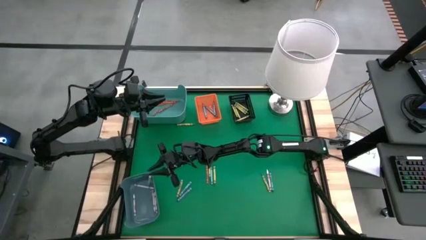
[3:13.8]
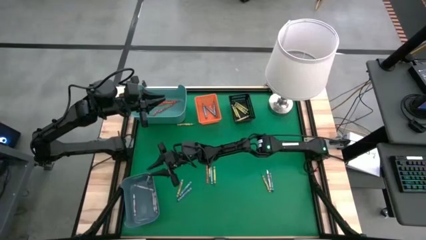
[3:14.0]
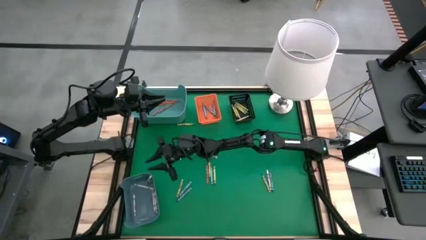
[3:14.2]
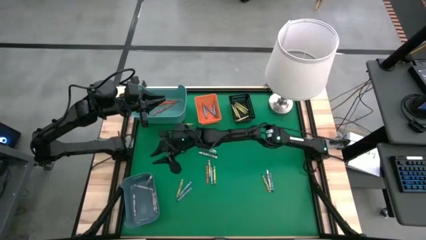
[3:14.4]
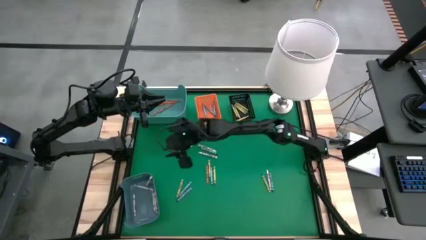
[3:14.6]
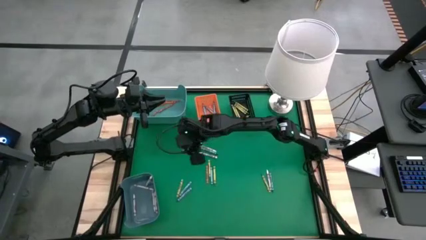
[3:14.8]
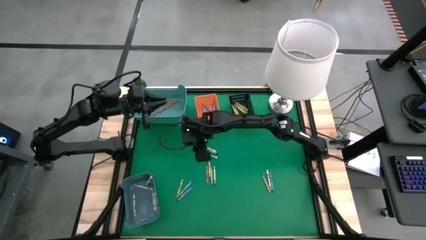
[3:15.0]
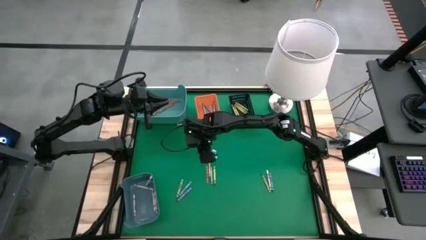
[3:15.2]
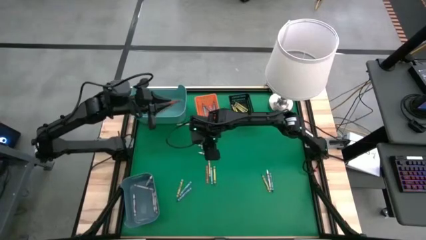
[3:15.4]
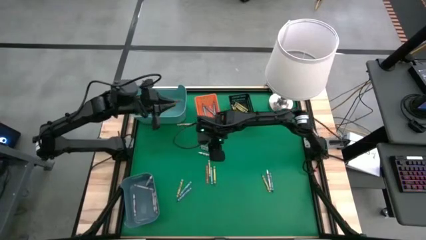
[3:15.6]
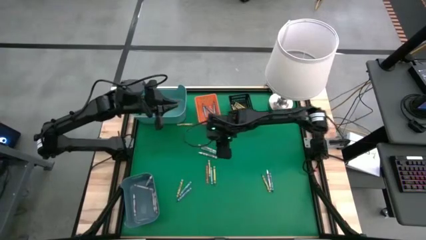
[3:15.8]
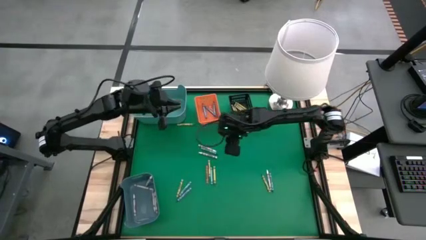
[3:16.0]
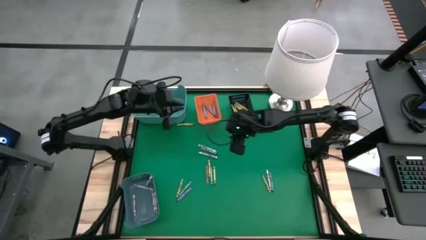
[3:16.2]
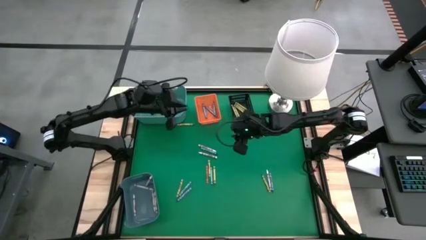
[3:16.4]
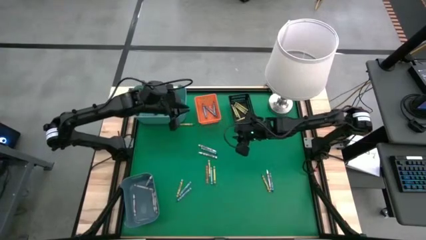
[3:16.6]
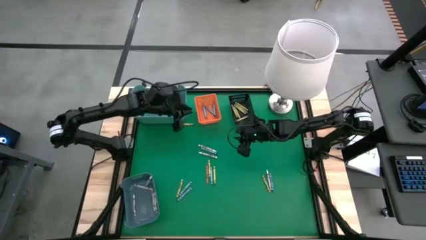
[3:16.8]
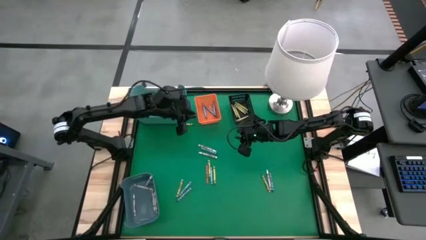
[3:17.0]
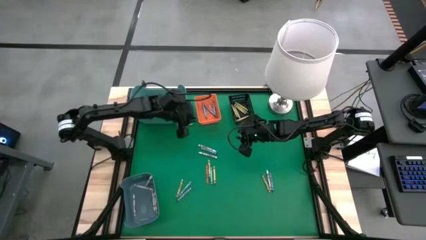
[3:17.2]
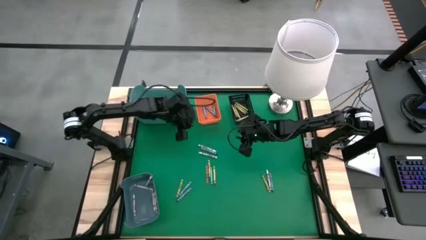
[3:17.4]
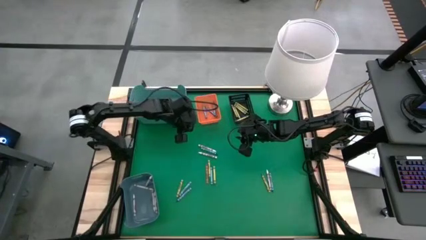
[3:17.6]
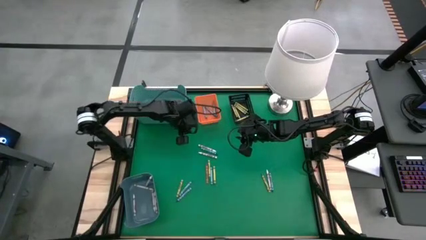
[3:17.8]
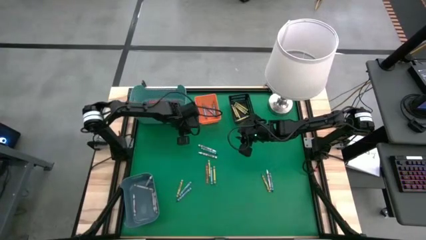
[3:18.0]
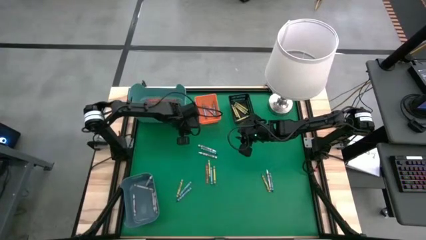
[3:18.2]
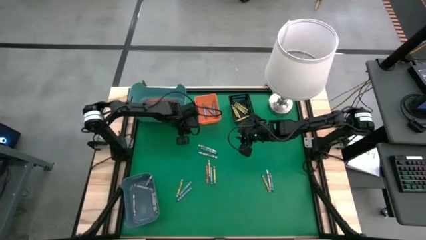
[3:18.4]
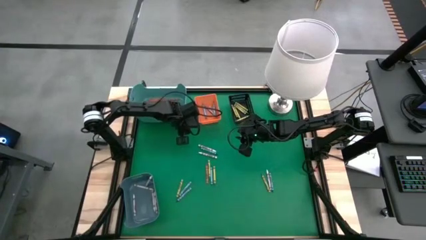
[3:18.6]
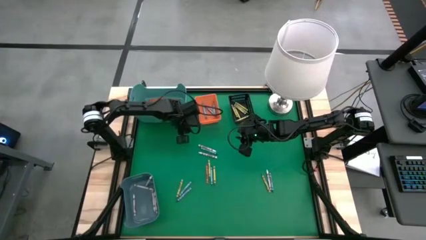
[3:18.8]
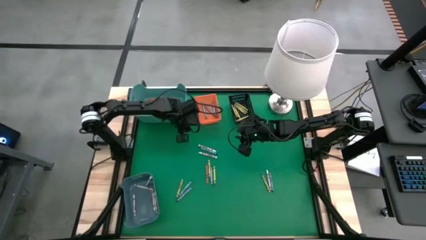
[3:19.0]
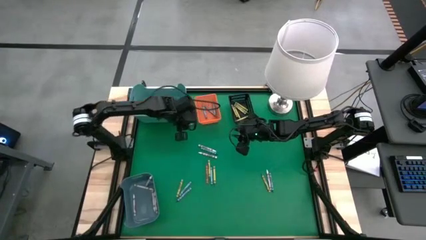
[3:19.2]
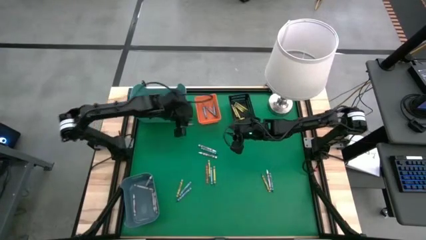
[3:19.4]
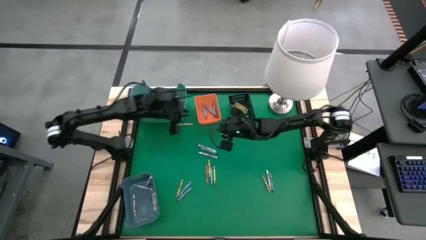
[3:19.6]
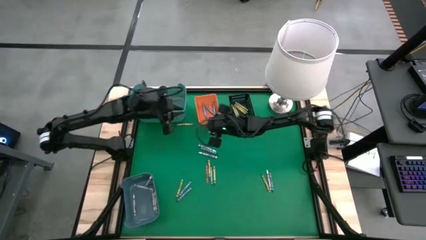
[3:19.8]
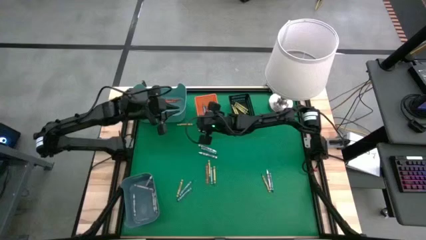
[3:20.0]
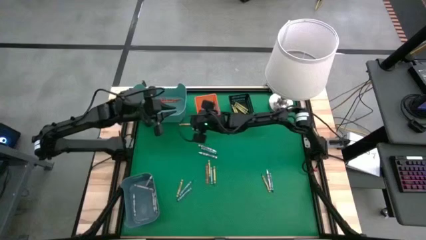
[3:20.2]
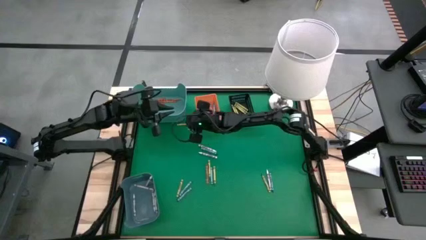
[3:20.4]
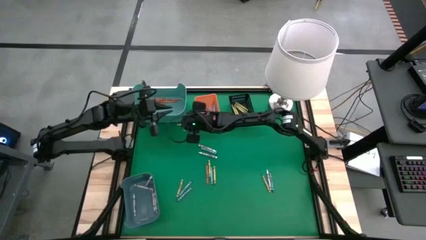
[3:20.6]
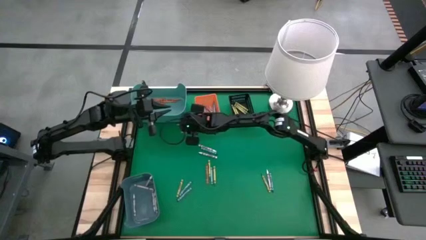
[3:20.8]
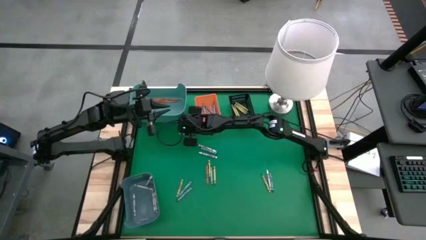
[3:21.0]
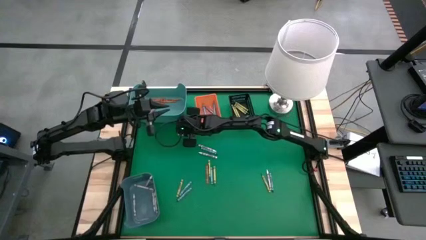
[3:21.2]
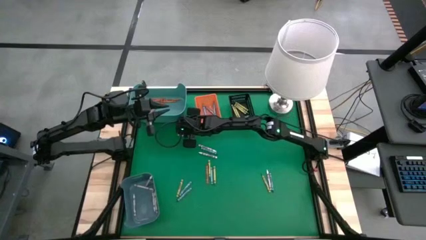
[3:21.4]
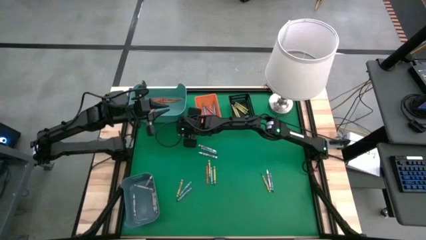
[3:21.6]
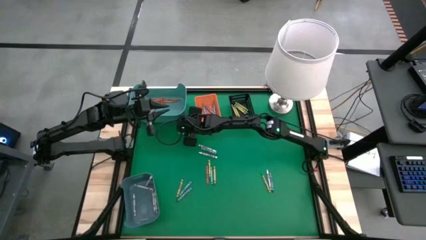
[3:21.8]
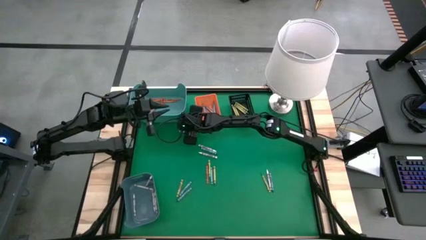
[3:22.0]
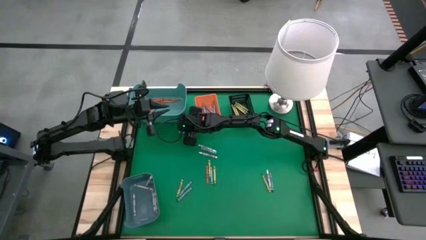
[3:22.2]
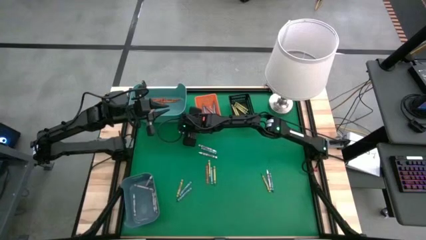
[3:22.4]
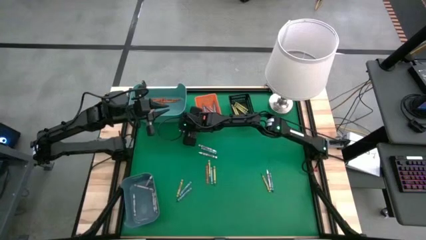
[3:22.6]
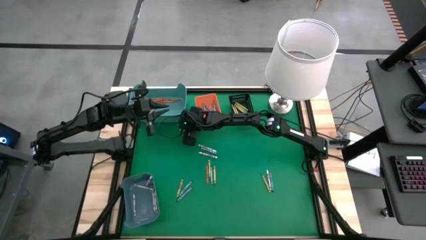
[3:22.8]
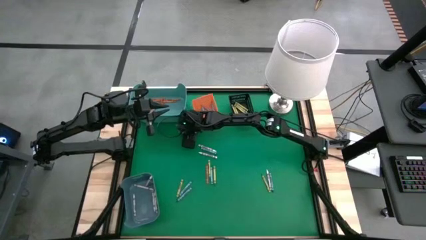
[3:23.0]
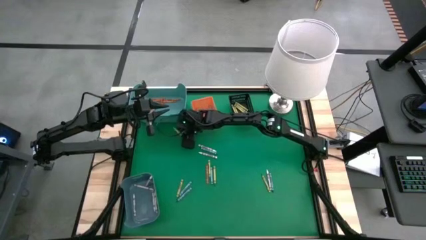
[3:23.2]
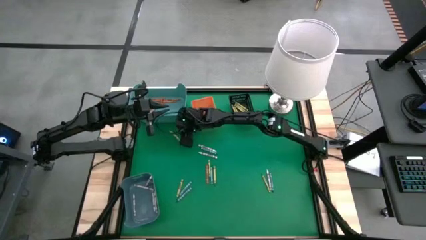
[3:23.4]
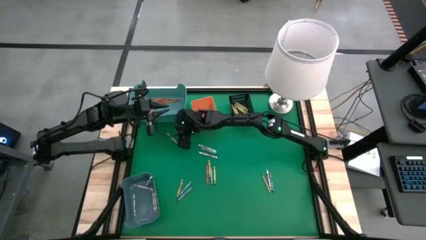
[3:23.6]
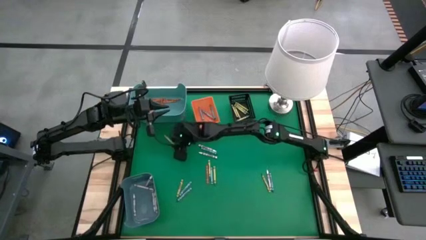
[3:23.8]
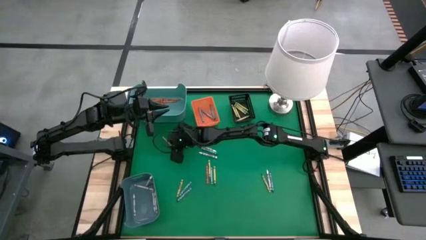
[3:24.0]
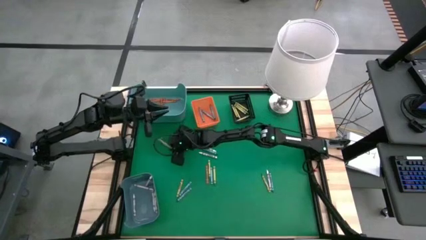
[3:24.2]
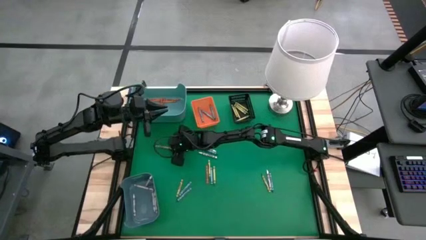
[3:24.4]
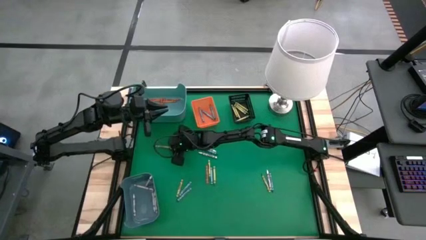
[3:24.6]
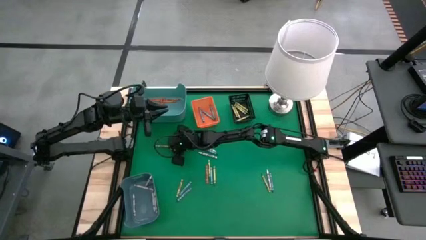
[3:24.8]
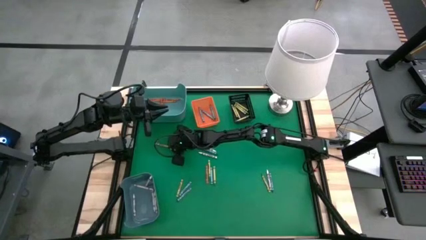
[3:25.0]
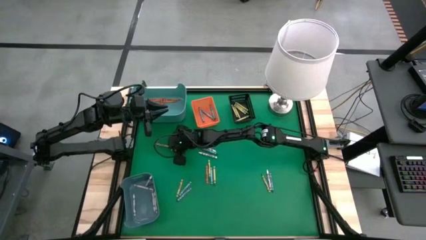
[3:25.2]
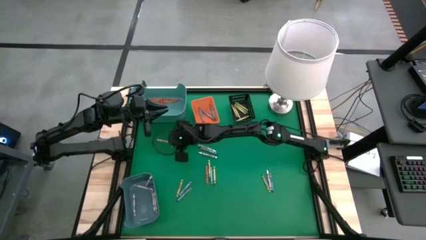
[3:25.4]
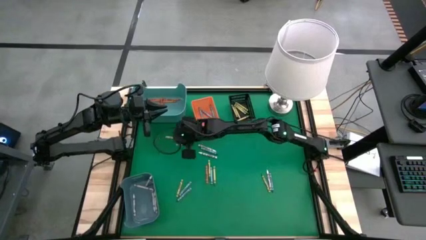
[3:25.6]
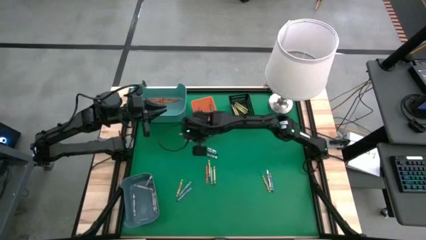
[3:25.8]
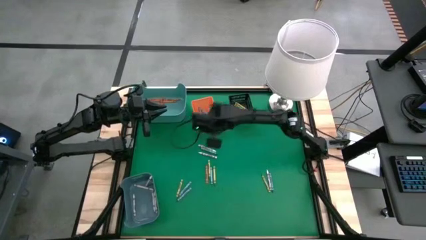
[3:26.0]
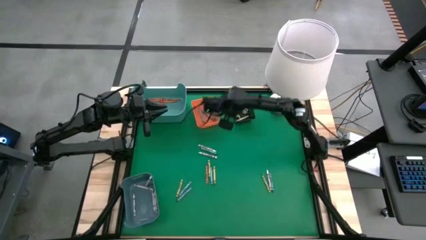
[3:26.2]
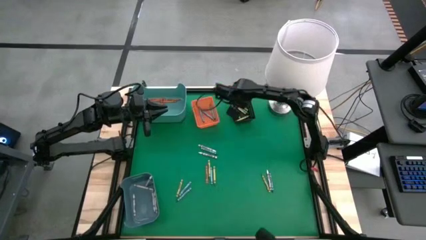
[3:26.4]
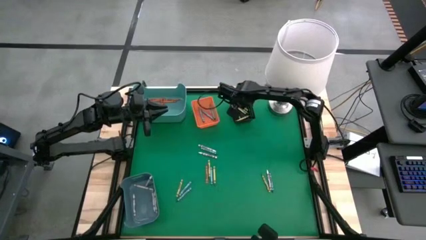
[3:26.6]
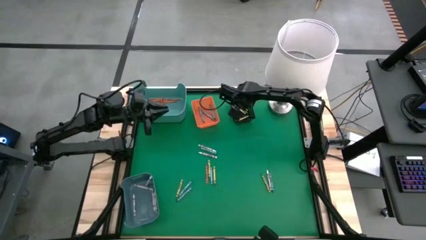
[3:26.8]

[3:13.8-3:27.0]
Task: Sort crayons
Put the green crayon into the black bin

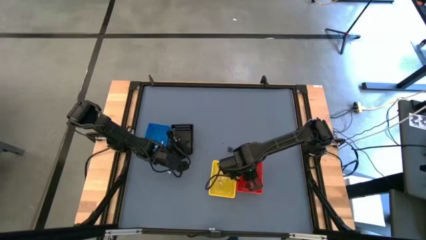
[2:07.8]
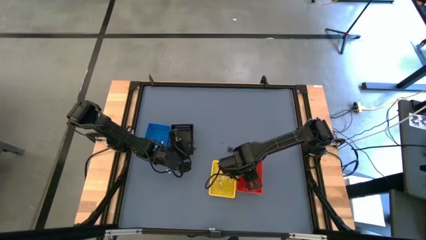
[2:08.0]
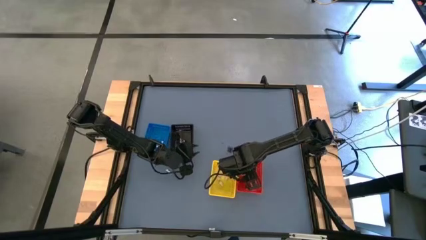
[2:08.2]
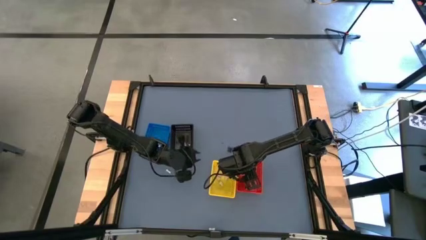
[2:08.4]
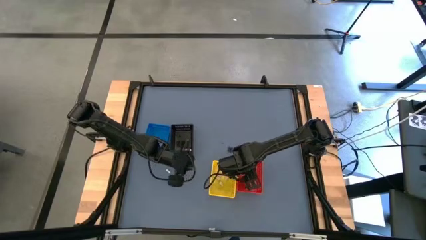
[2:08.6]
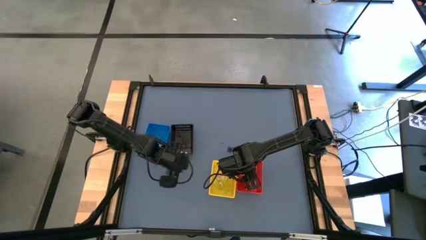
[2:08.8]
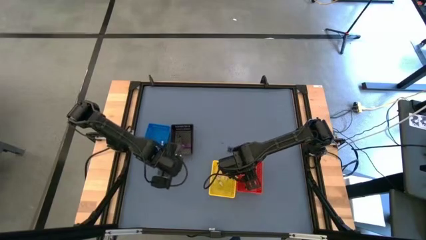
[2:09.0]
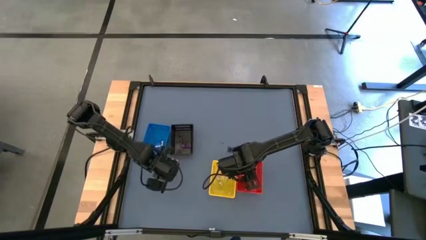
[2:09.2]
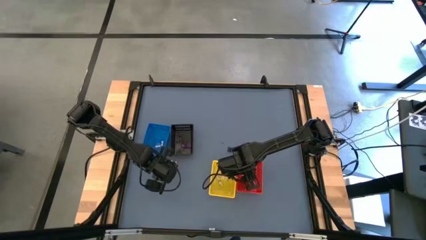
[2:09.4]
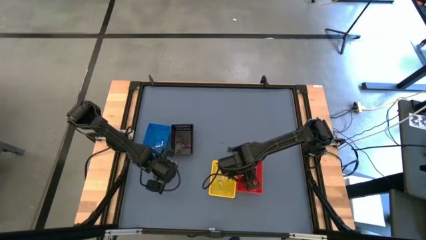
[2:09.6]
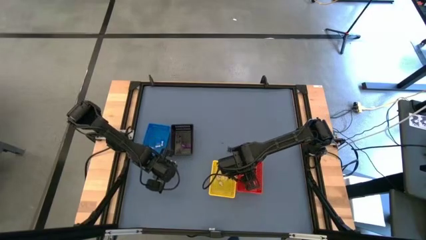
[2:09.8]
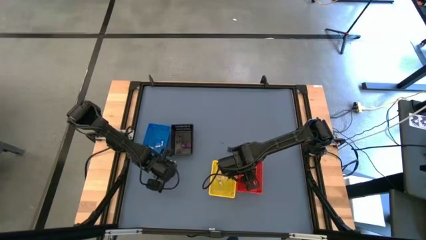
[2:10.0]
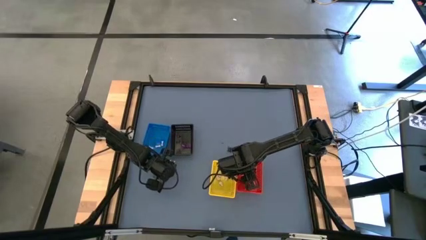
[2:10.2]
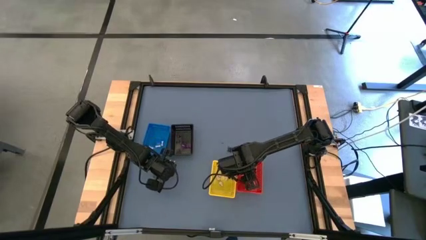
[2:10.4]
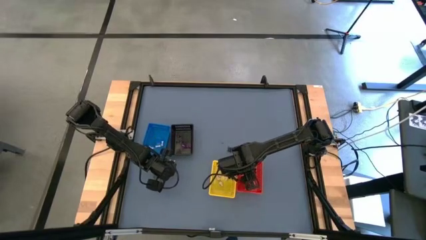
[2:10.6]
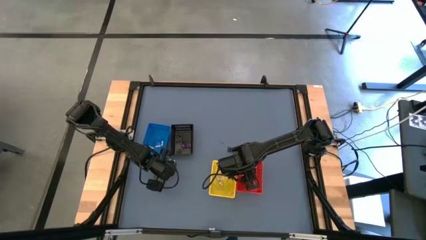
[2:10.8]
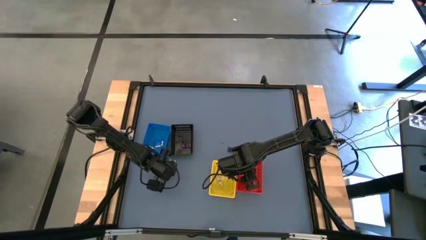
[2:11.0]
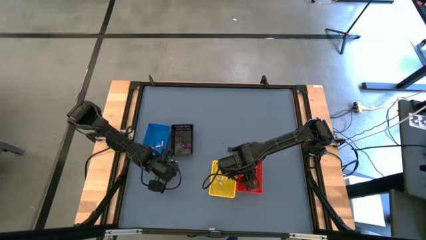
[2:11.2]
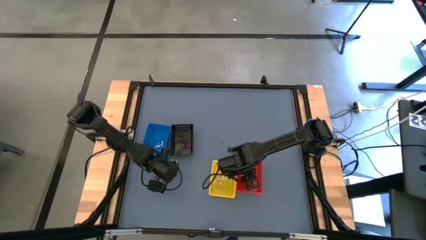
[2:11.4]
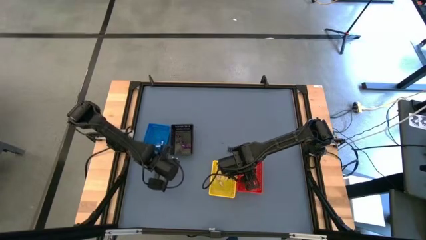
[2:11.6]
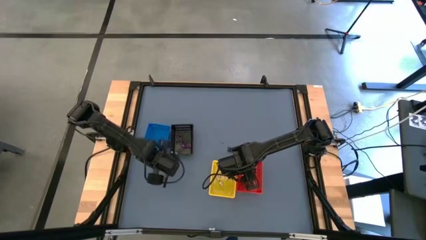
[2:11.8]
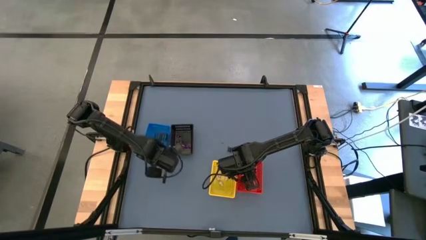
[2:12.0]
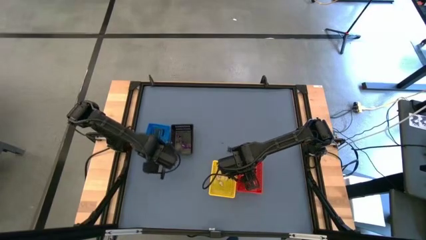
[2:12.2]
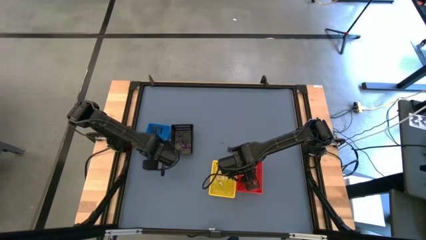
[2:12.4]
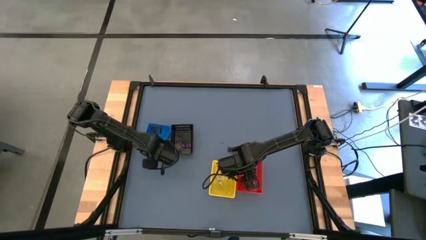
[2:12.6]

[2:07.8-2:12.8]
Task: Sort Halloween decoration
Put the bone toy into the blue bin
